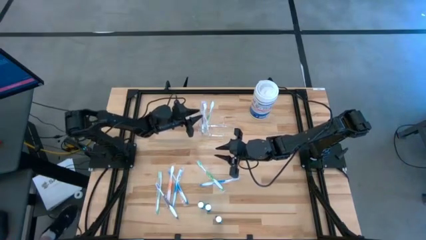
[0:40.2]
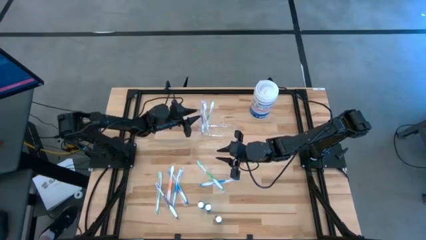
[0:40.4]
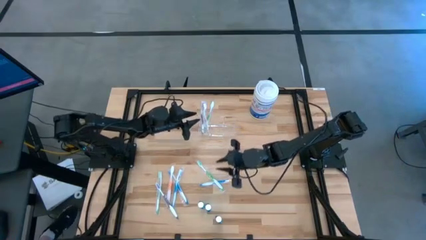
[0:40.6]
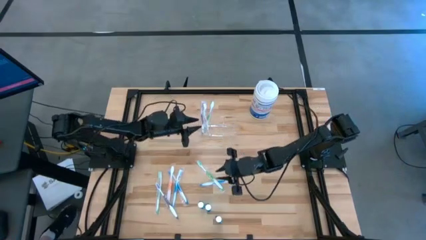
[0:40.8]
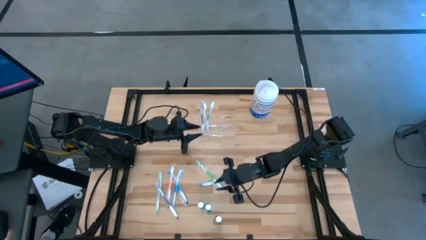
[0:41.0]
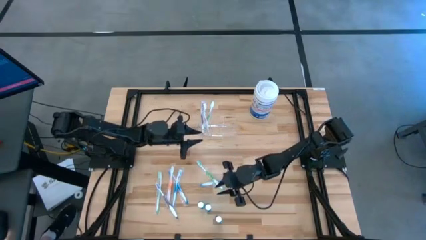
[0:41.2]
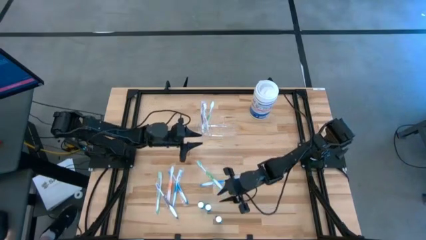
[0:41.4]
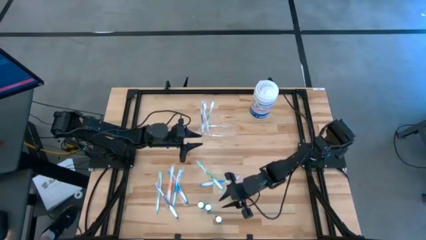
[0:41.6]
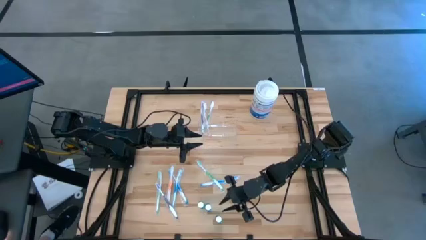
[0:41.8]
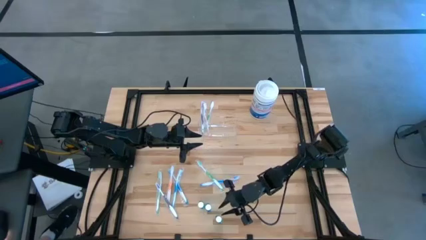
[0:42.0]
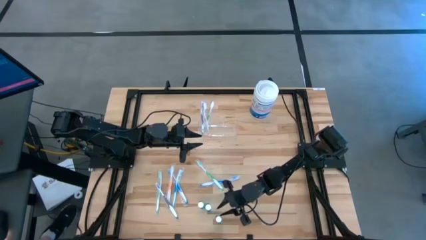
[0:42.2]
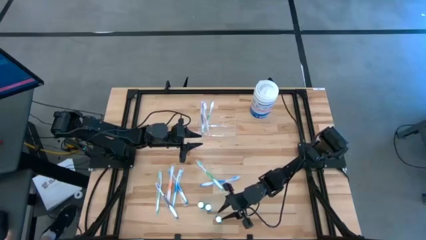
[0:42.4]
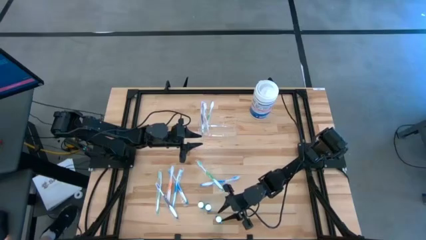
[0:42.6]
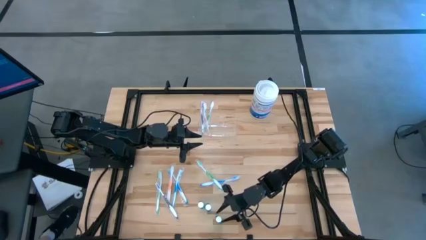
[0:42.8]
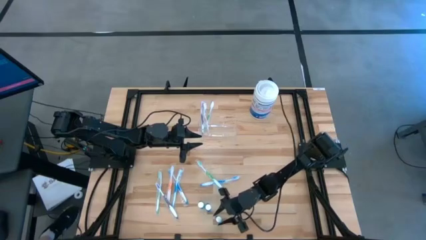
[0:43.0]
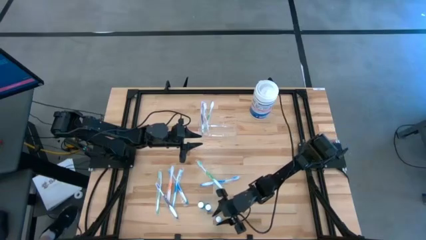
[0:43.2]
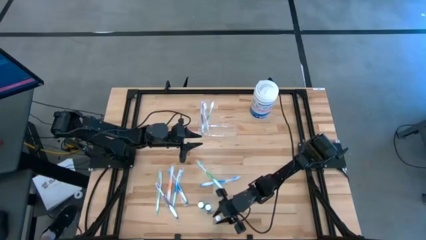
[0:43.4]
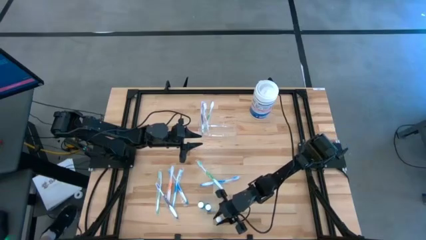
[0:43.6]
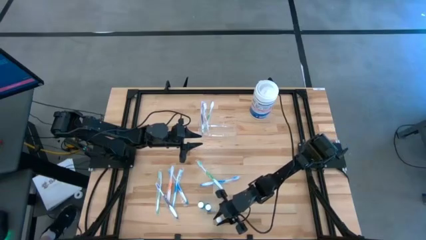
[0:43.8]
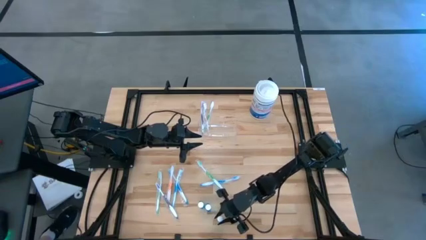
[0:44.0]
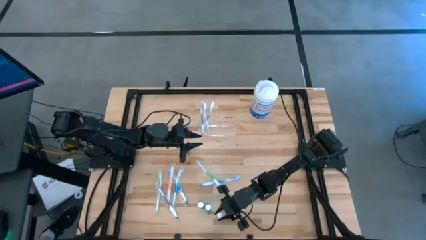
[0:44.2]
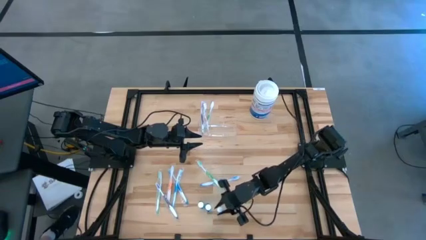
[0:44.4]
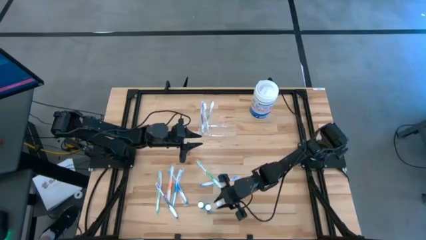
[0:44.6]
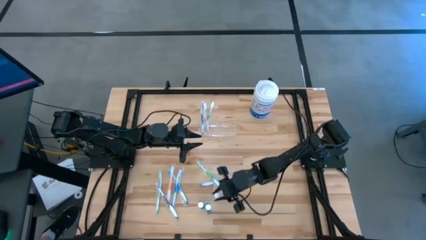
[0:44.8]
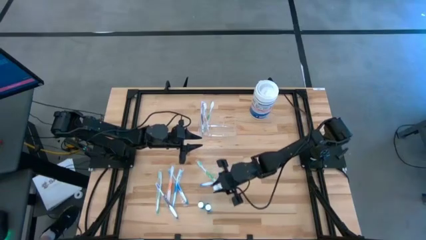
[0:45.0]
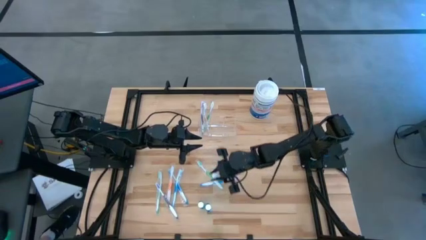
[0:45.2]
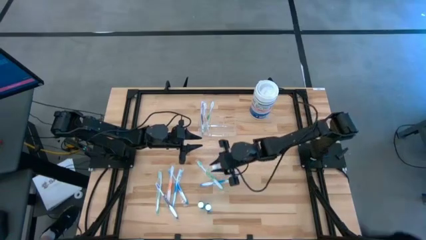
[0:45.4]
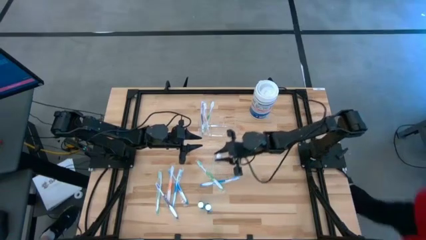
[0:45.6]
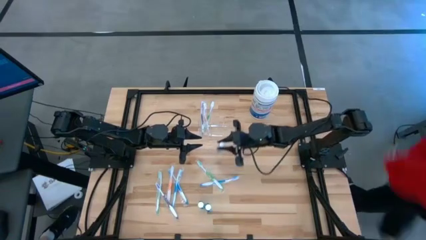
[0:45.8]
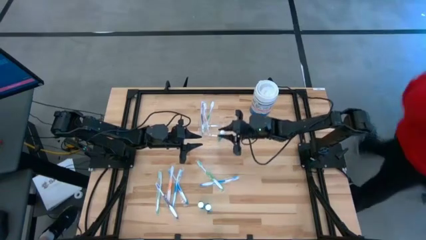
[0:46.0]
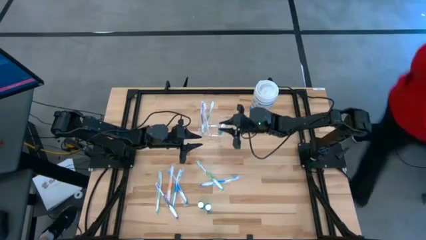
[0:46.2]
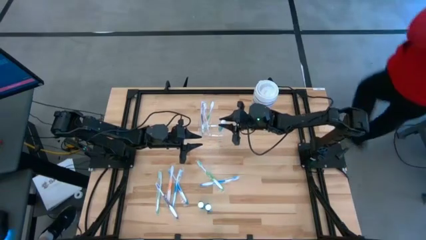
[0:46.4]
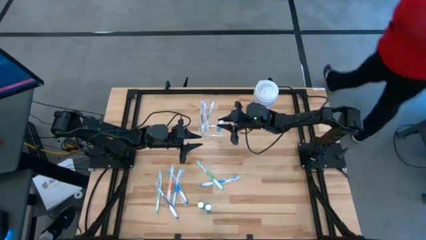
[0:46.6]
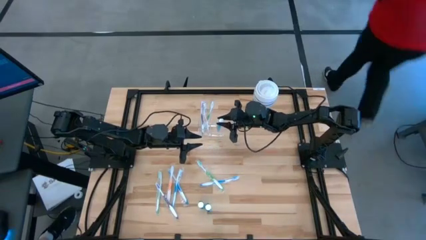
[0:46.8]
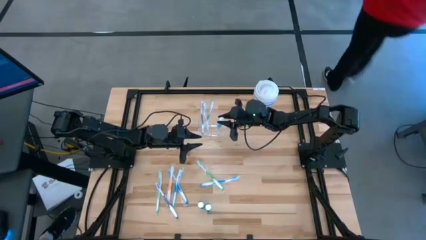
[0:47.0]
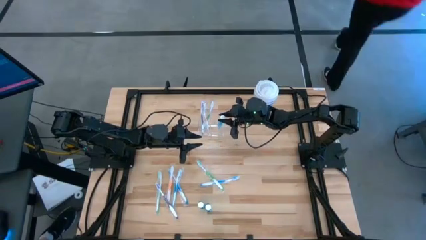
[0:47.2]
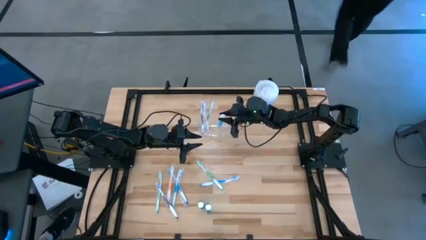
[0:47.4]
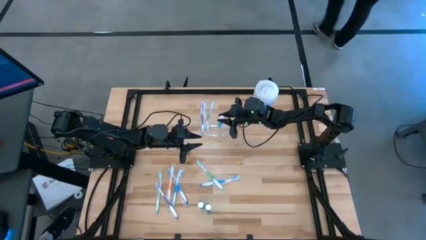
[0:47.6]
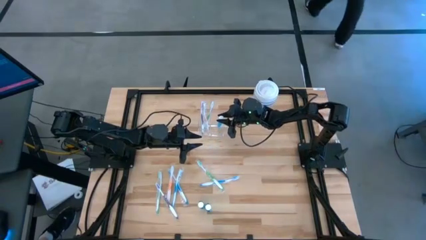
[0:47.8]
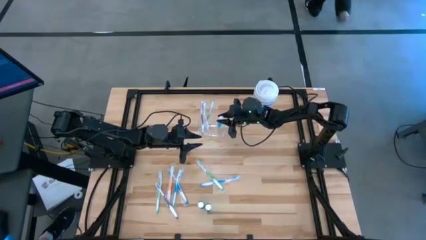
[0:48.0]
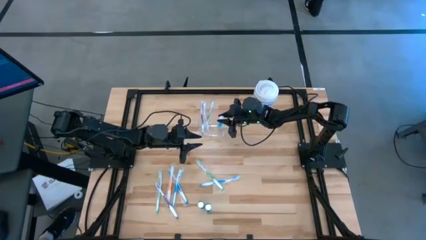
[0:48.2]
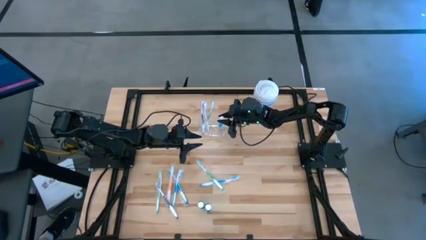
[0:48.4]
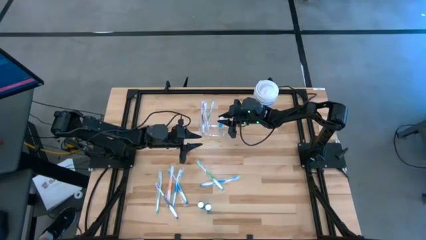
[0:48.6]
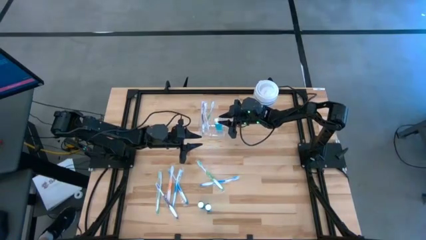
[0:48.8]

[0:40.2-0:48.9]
Task: Pick & Place toothbrushing station
Put the bottom mouthwash into the transparent organizer

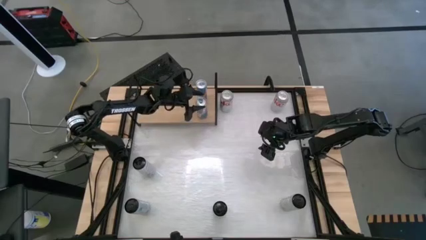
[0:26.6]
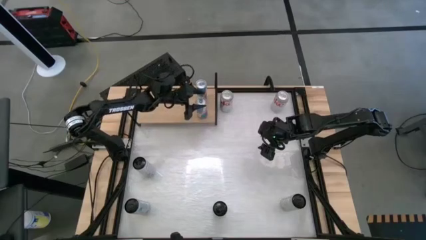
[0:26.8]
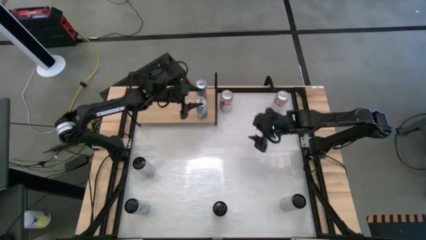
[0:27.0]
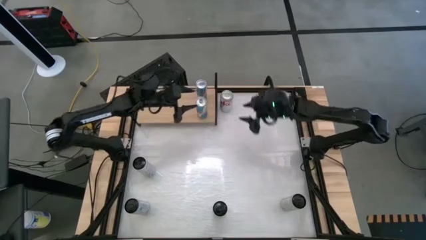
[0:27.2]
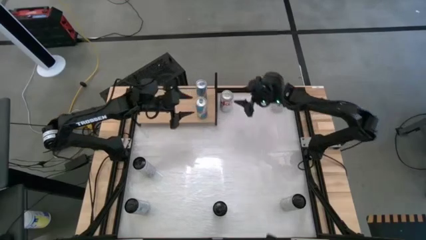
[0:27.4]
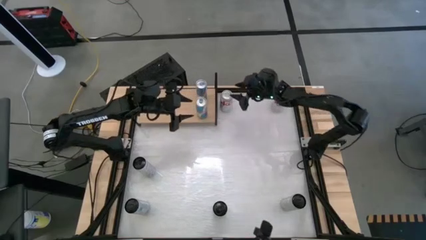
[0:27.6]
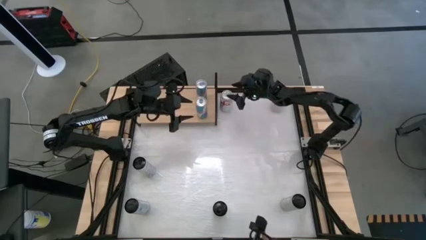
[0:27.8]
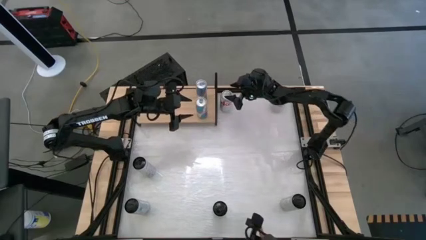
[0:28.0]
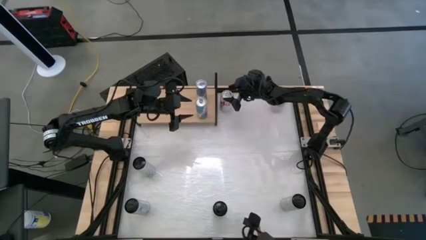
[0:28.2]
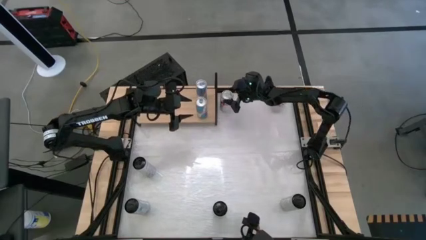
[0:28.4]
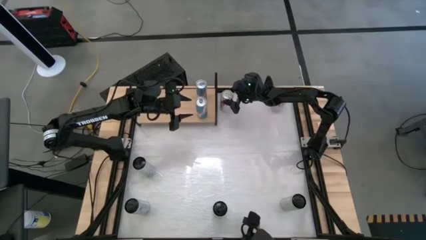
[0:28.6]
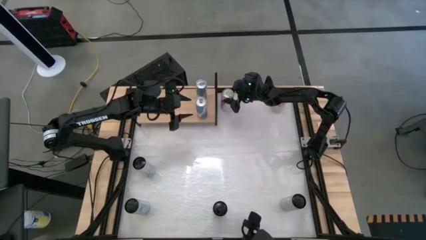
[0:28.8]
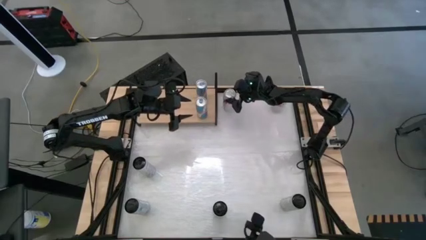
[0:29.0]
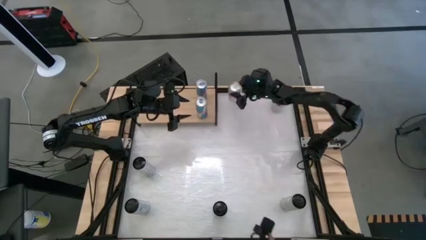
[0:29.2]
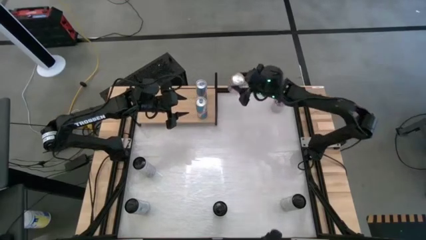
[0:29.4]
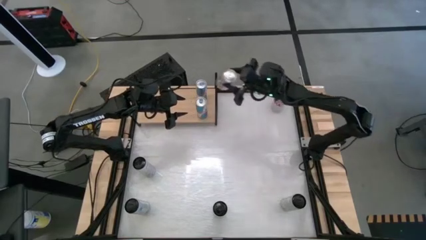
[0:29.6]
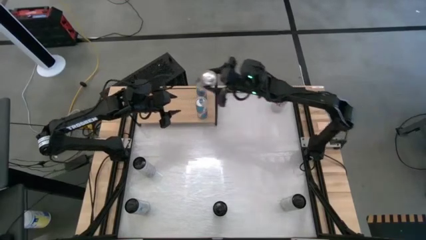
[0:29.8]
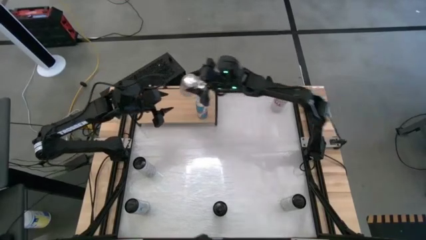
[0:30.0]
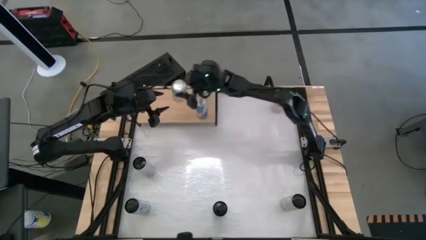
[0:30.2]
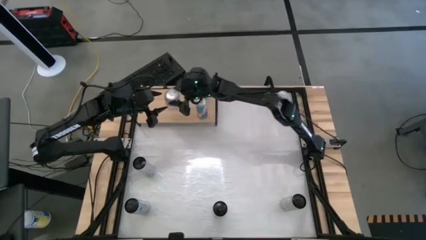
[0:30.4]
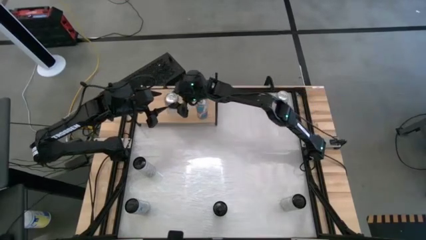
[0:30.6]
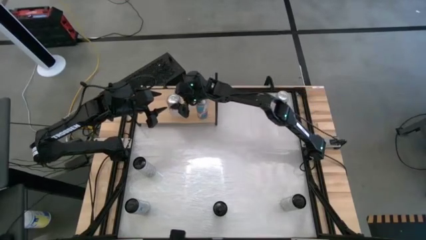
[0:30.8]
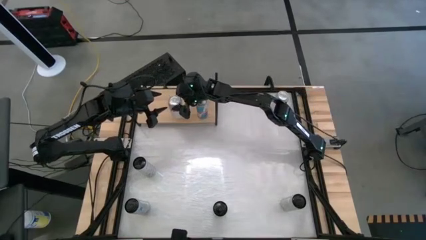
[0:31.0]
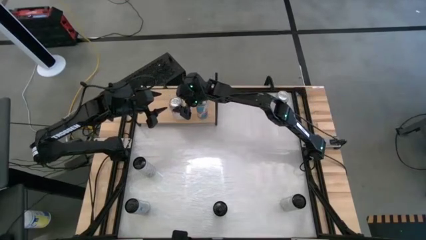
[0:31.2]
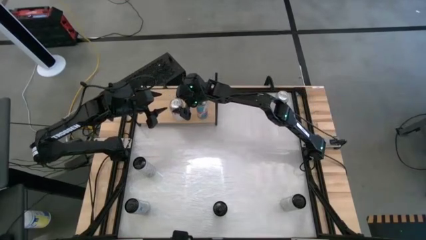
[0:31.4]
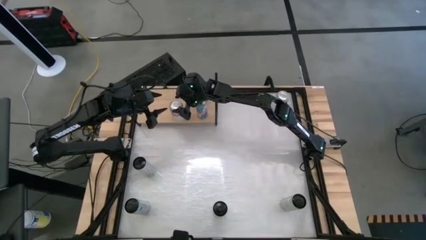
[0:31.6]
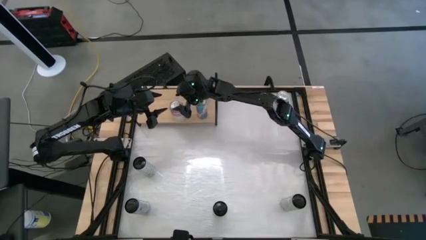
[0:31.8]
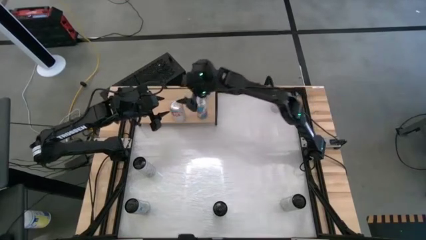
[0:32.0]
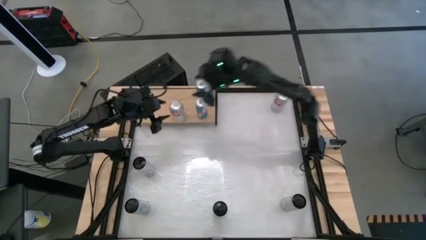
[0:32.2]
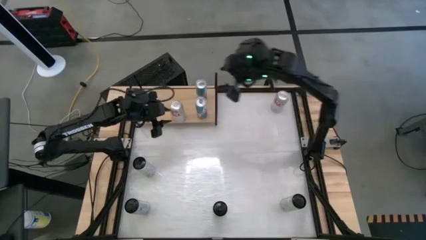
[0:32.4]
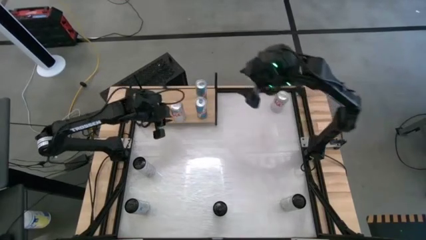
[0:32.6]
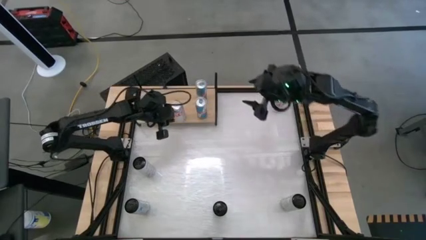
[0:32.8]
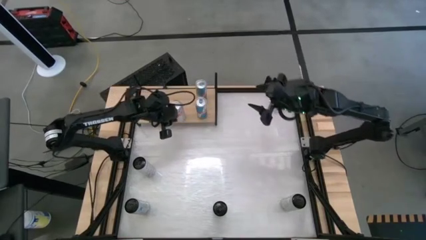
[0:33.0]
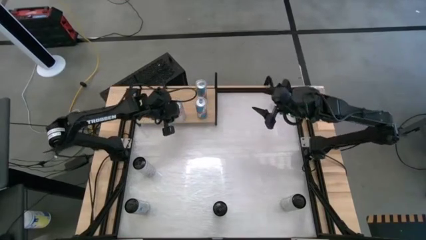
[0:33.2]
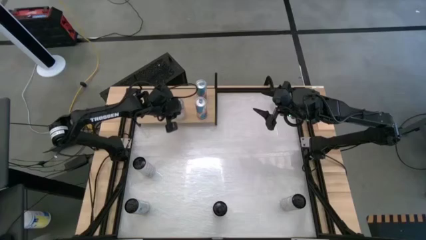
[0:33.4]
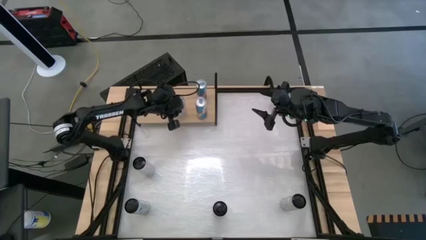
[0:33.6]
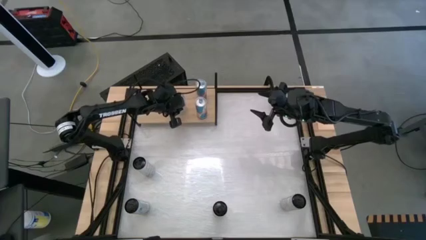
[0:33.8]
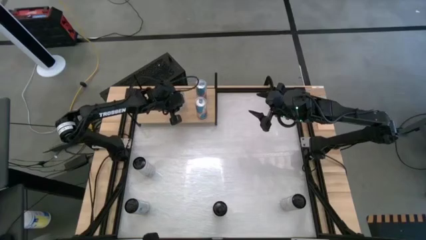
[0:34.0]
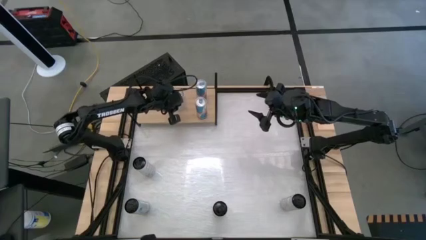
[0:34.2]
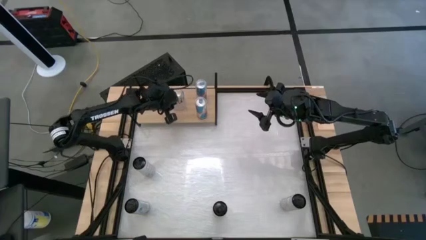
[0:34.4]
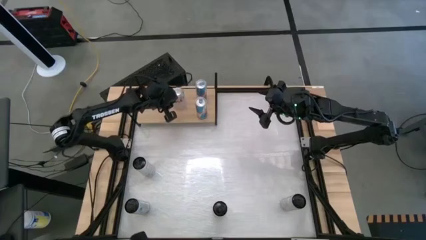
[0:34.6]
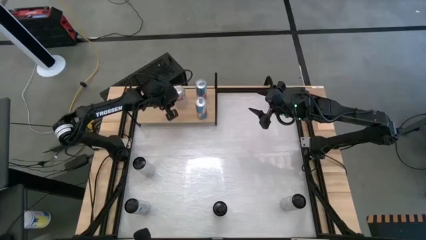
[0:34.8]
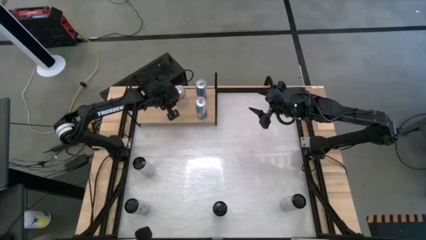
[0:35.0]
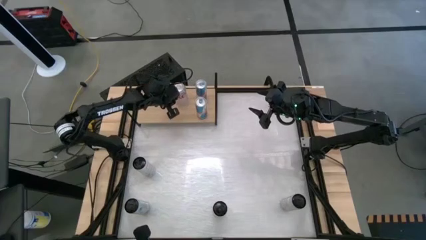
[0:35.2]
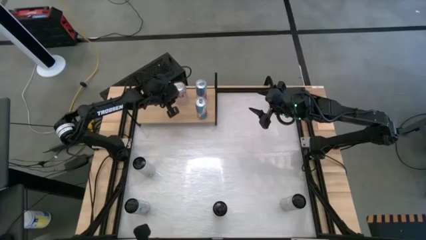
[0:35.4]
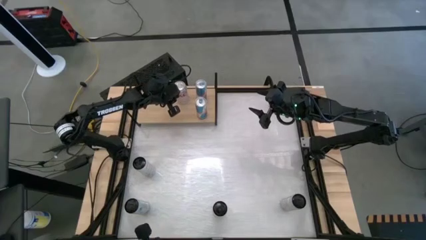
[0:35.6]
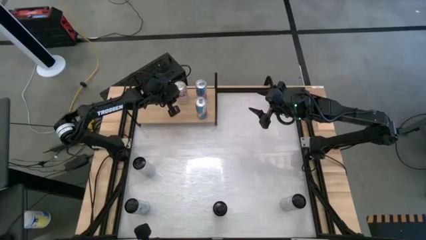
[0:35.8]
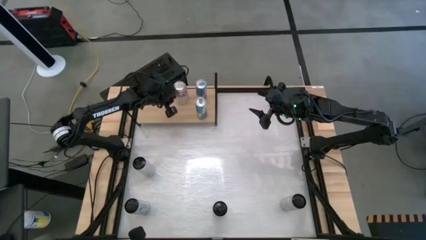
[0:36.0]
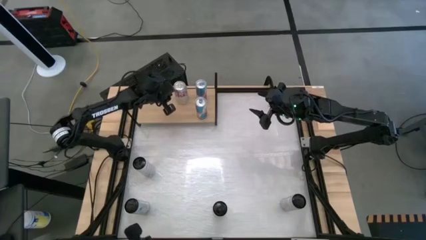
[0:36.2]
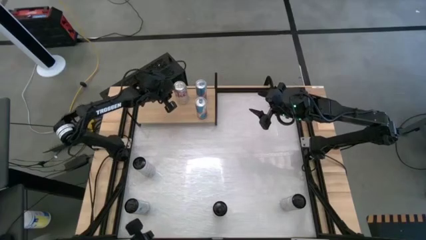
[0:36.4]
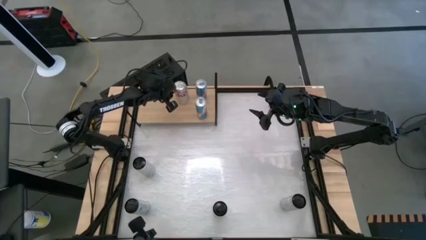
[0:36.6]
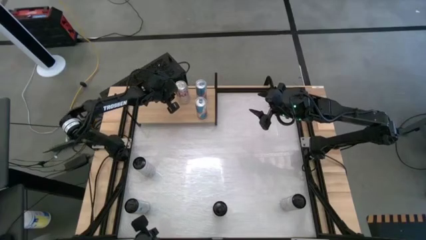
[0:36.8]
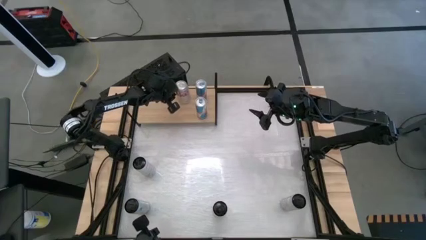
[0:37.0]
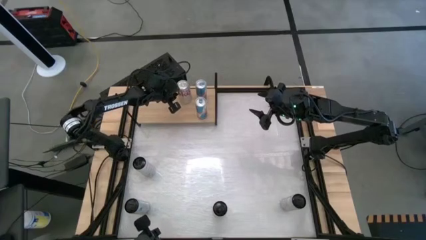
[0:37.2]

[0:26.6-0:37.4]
Task: Place canned beverage on shelf
Put the left silver soda can on the shelf
